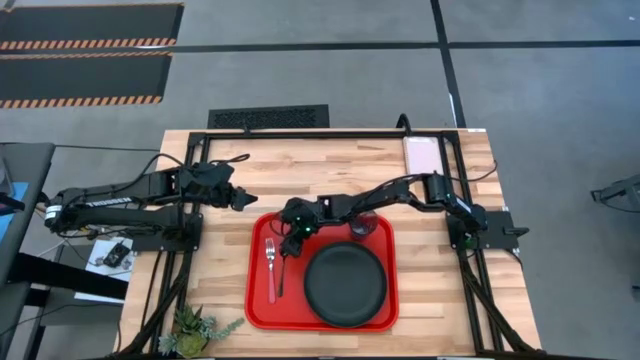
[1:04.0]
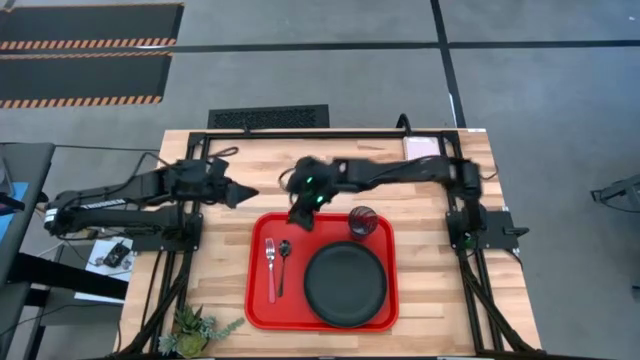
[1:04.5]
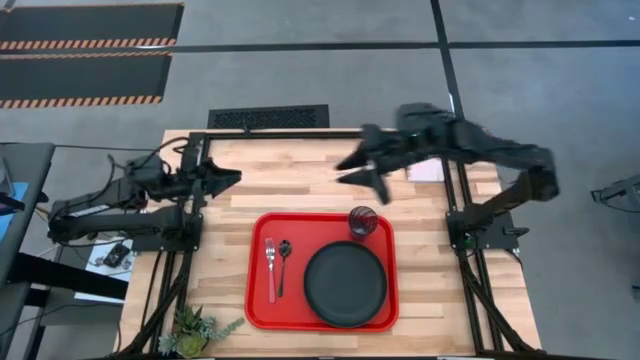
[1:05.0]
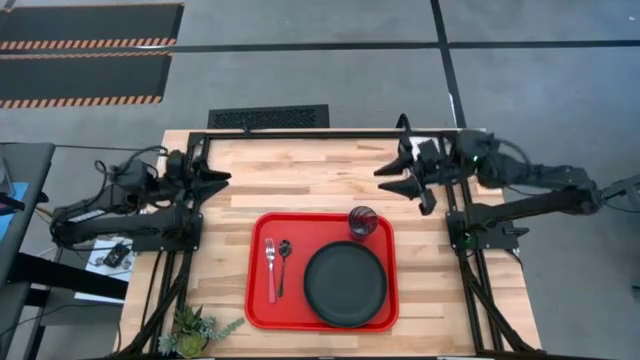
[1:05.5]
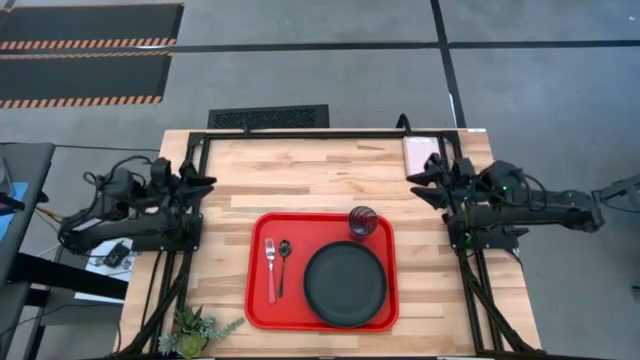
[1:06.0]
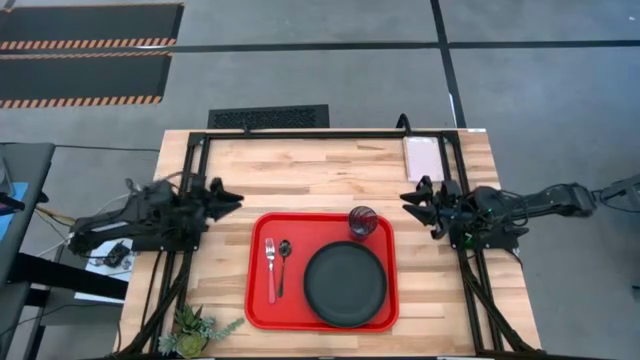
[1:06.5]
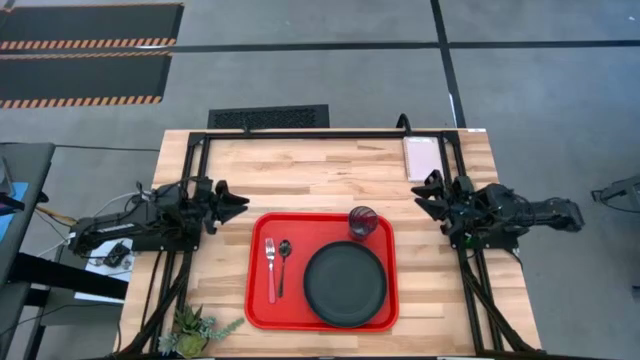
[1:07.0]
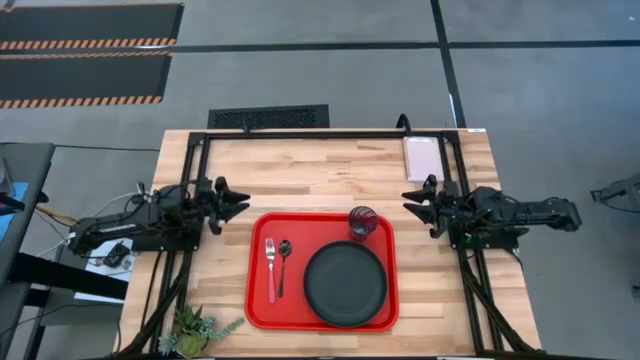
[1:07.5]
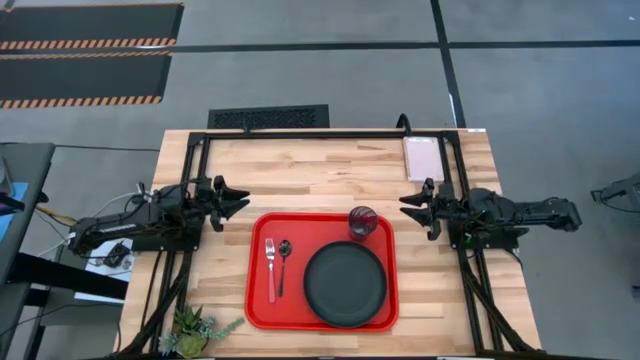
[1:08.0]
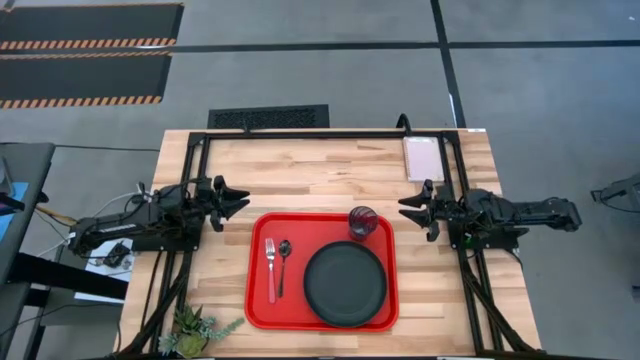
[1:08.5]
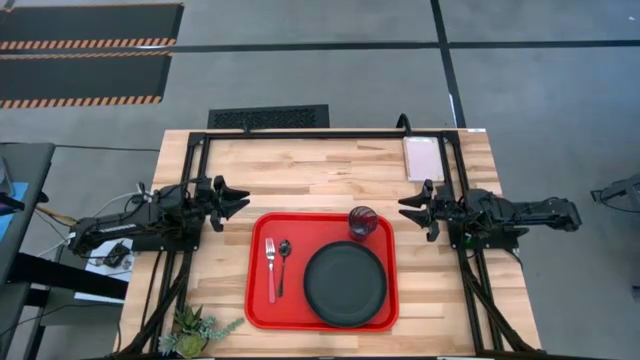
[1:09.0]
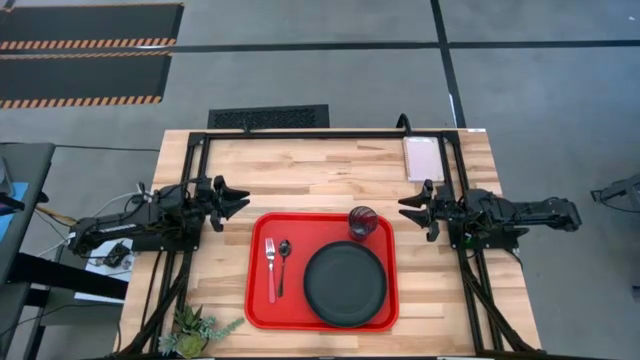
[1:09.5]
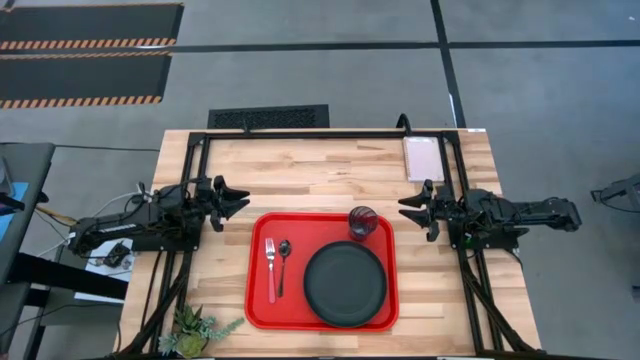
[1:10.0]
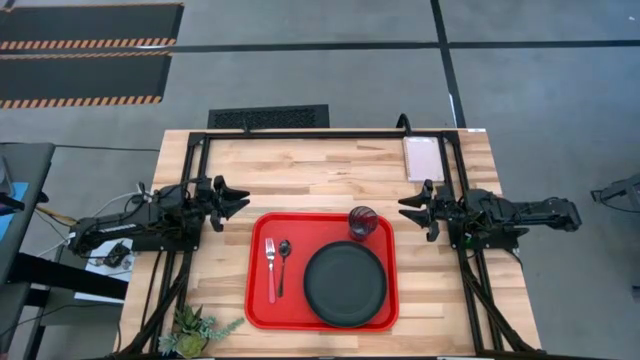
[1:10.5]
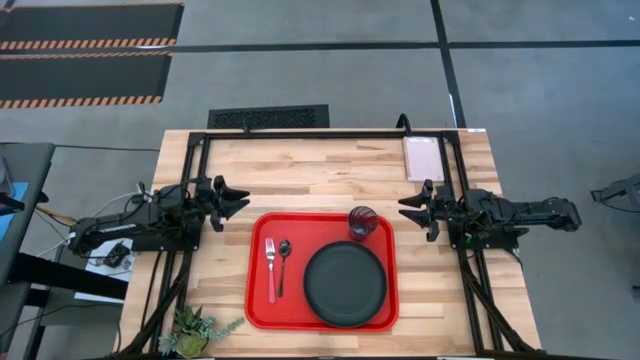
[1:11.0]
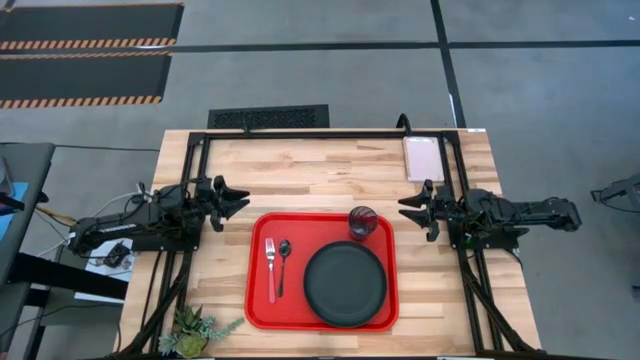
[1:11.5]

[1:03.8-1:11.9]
Task: Pick and place plate/cup/fork/spoon on tray
Return to Home Position

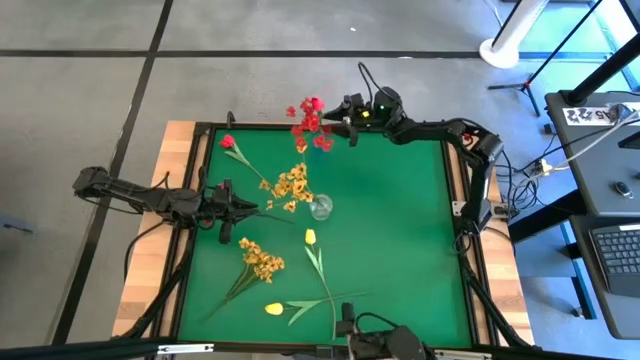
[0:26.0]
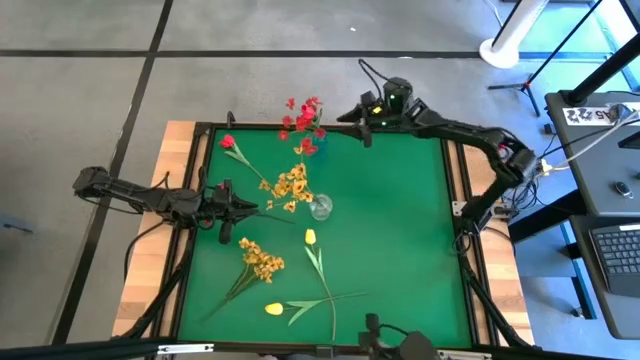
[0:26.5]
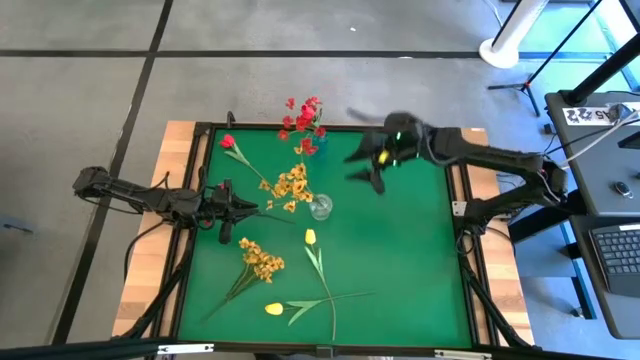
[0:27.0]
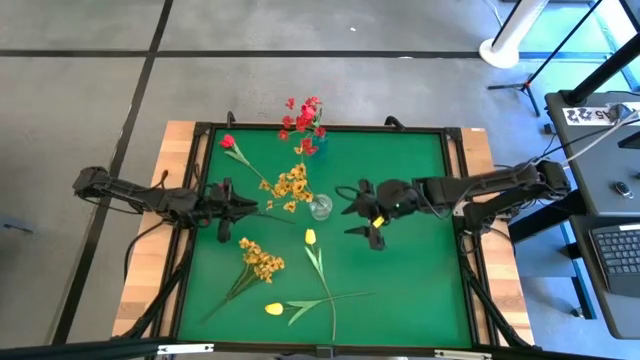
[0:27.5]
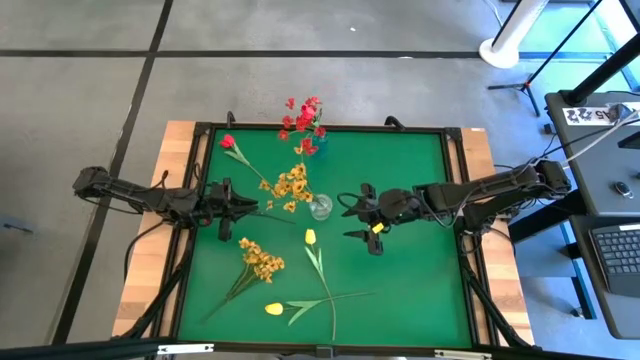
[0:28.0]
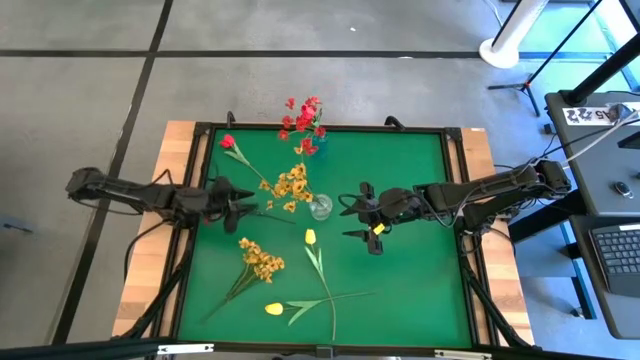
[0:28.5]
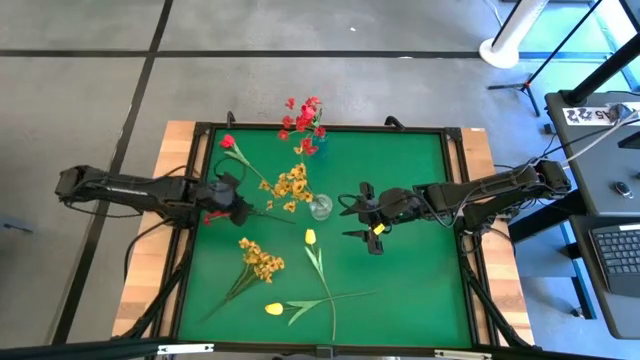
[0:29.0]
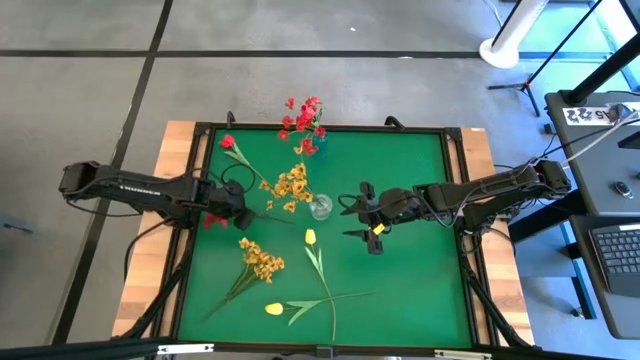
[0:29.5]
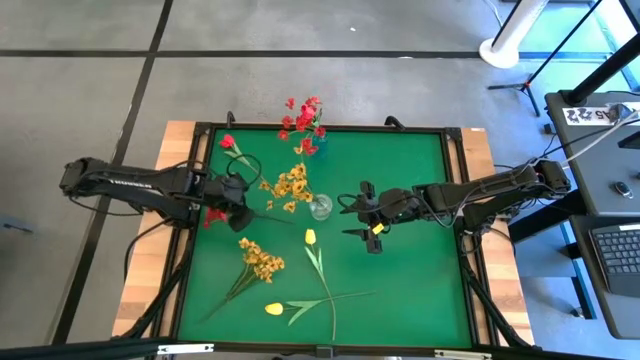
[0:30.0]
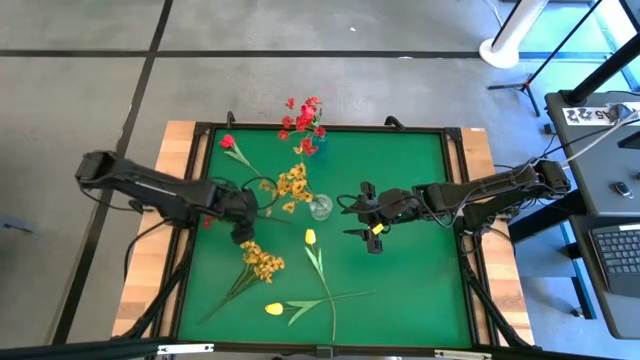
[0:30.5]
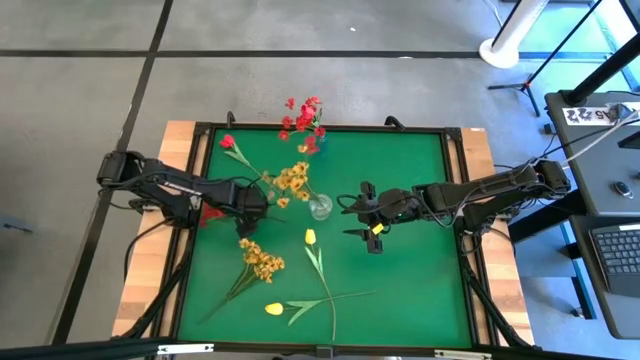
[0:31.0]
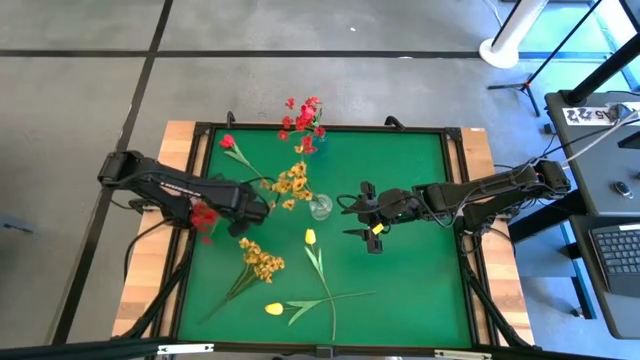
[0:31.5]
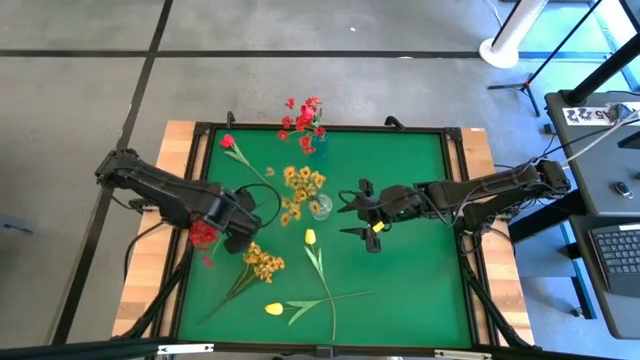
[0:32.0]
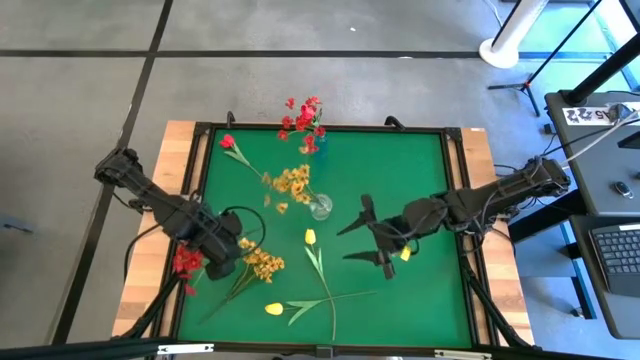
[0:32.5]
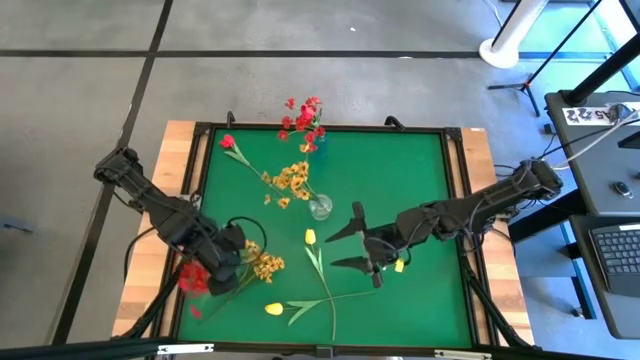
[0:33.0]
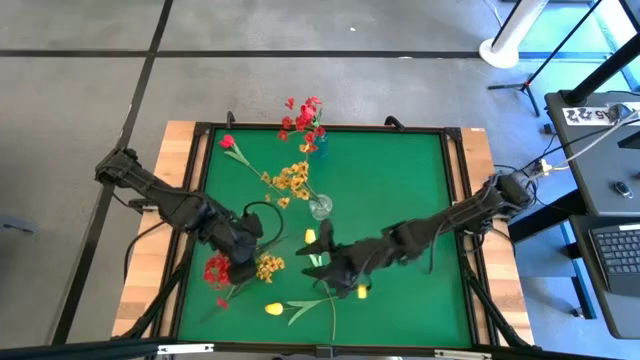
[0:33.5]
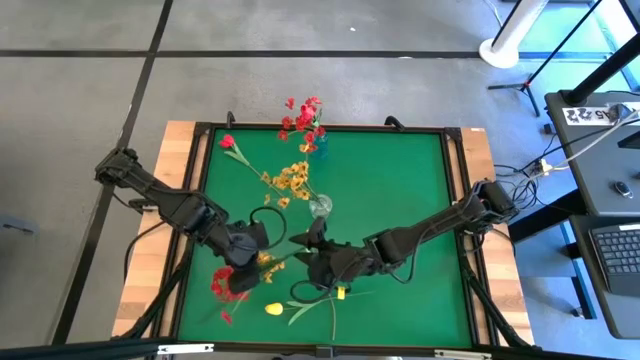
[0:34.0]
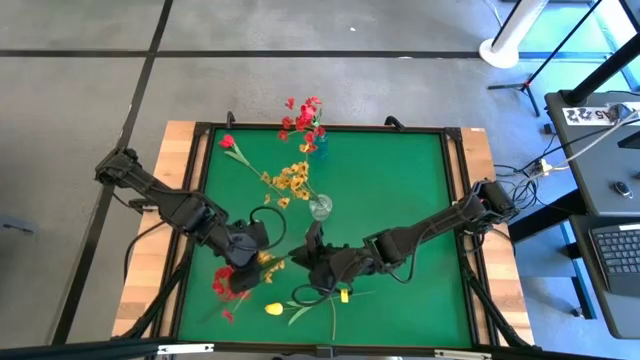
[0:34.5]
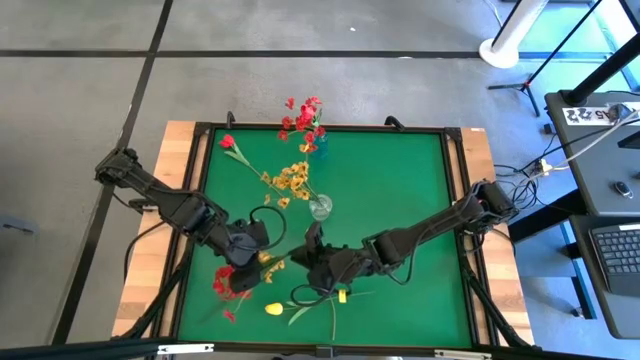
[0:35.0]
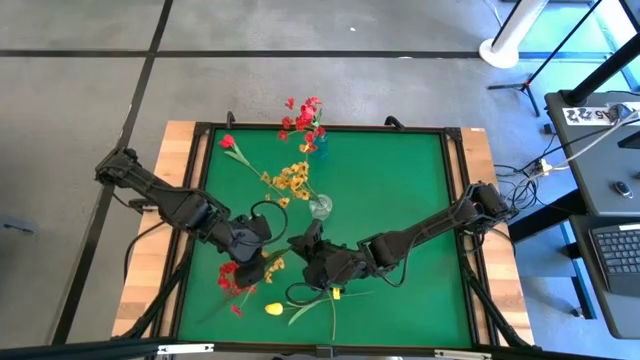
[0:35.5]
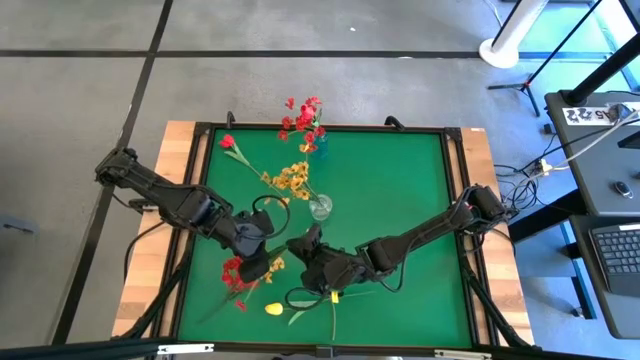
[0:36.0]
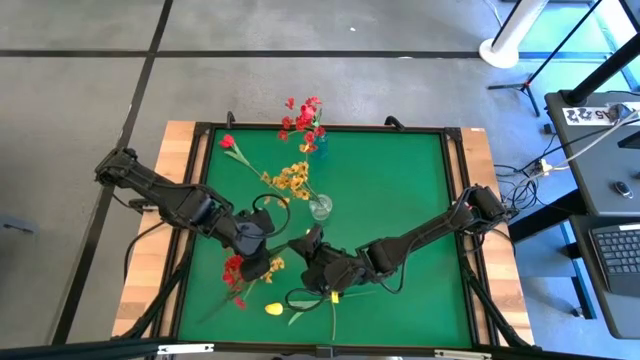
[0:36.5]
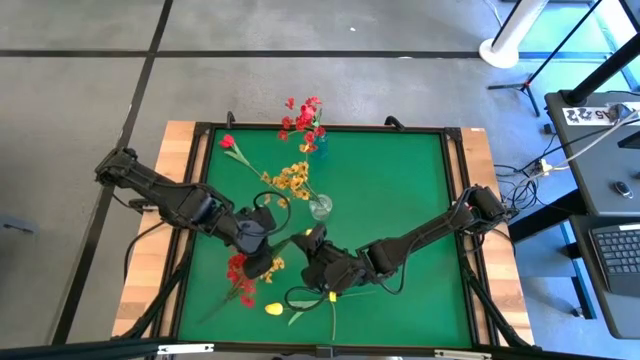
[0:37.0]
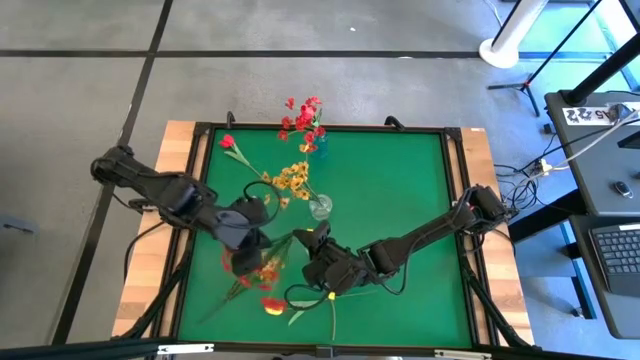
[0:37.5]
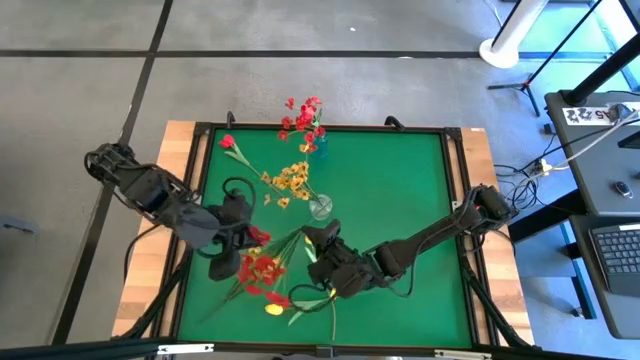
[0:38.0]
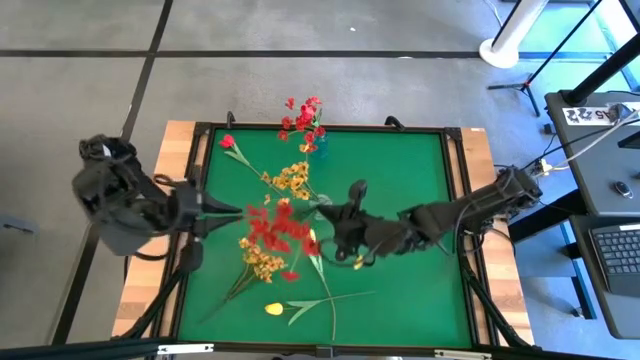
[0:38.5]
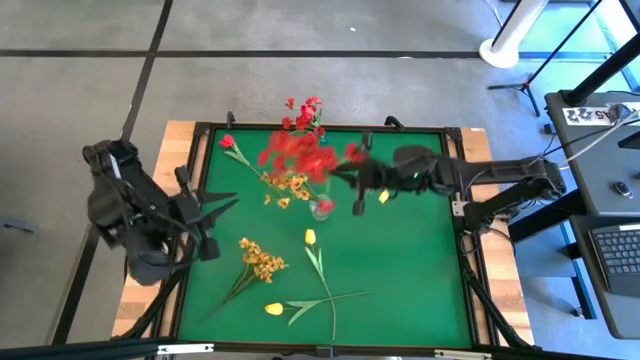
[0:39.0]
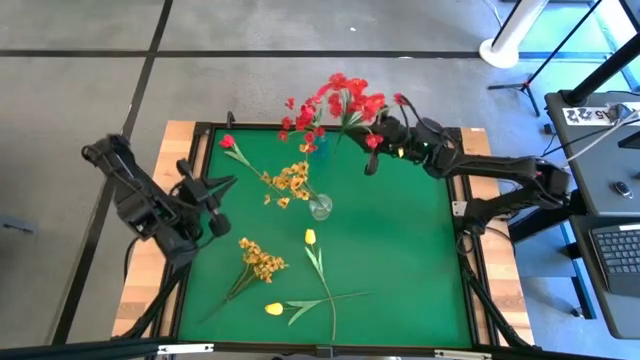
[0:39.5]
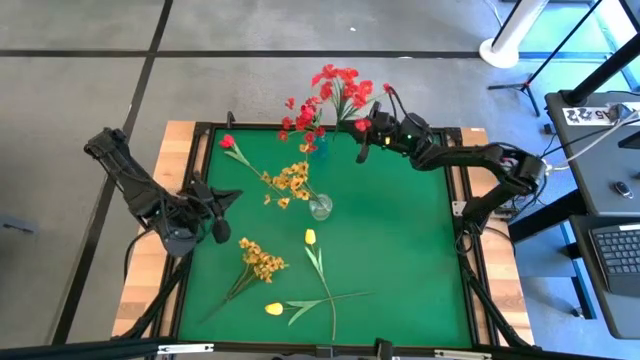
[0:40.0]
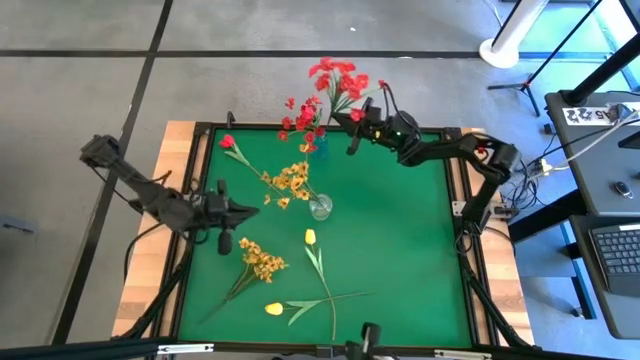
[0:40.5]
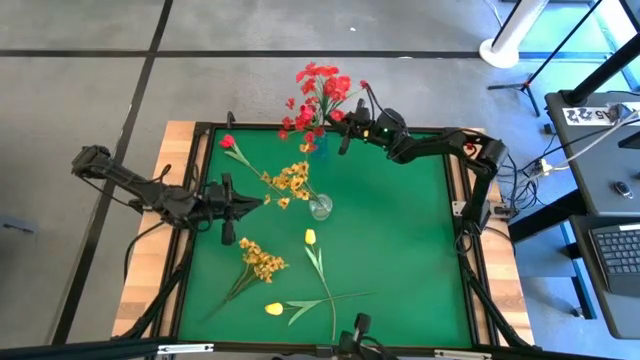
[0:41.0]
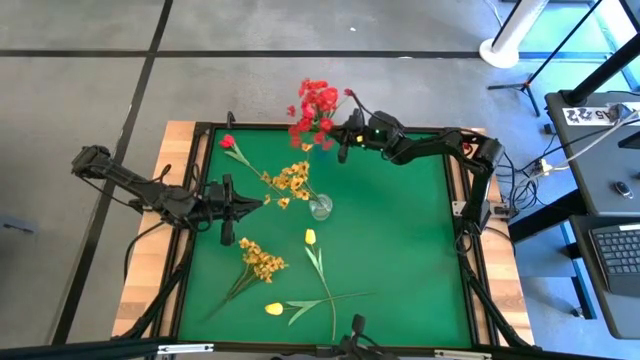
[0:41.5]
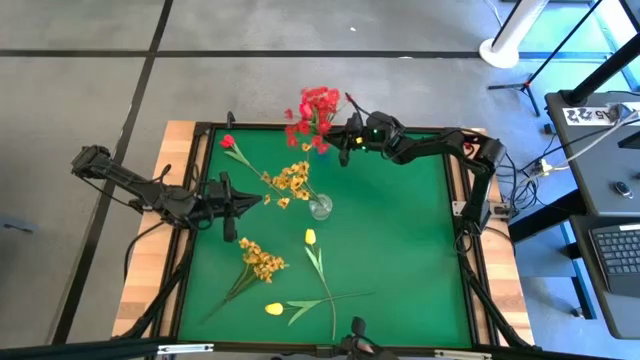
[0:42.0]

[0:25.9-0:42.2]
Task: Sort flowers into vase by color
Put the red flowers into the blue vase
